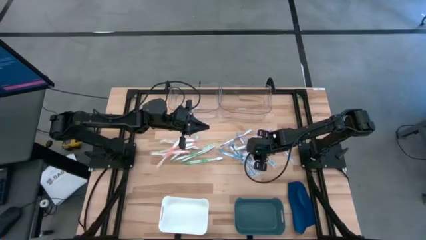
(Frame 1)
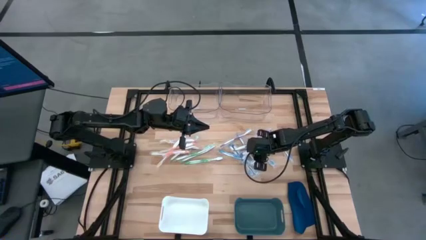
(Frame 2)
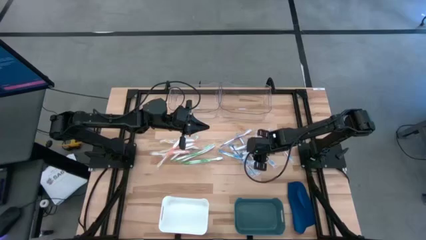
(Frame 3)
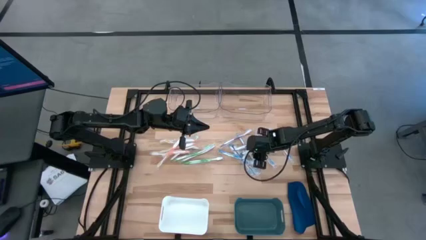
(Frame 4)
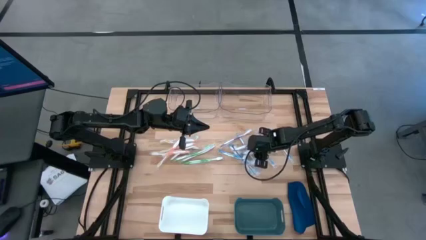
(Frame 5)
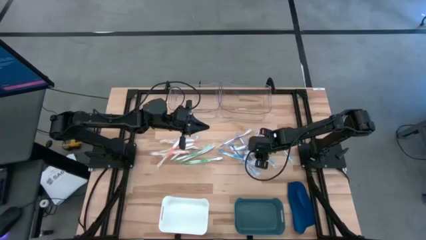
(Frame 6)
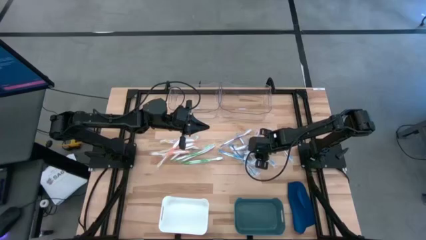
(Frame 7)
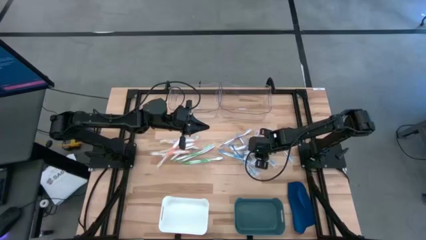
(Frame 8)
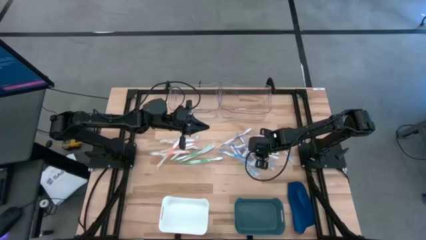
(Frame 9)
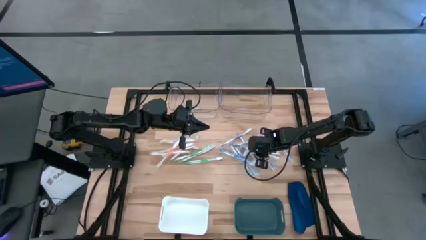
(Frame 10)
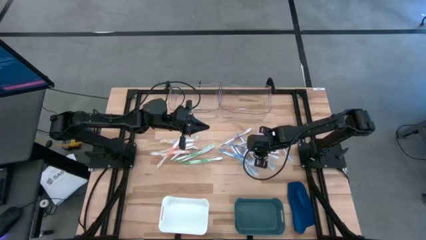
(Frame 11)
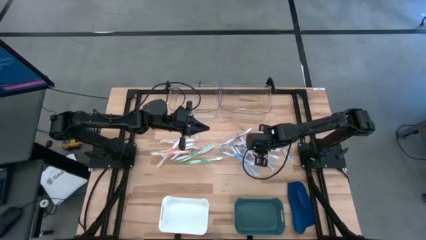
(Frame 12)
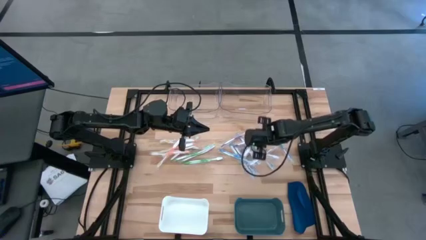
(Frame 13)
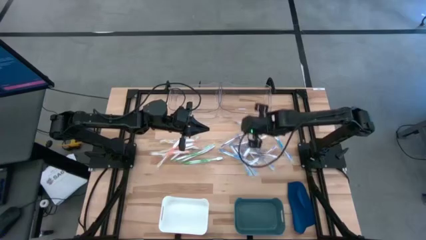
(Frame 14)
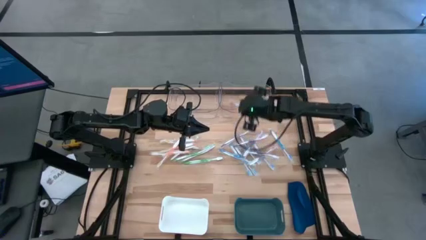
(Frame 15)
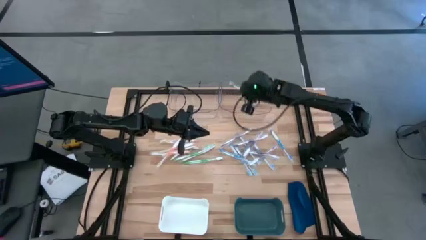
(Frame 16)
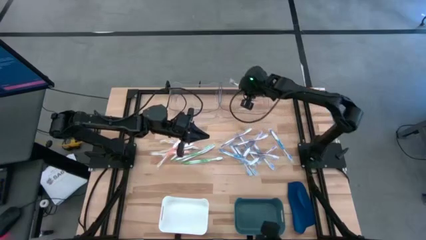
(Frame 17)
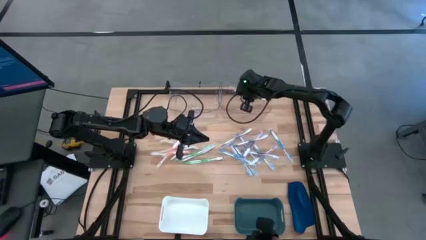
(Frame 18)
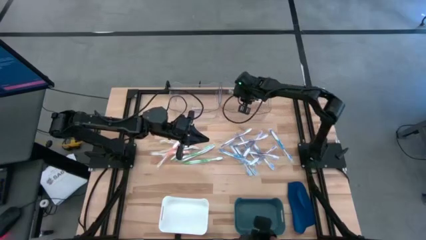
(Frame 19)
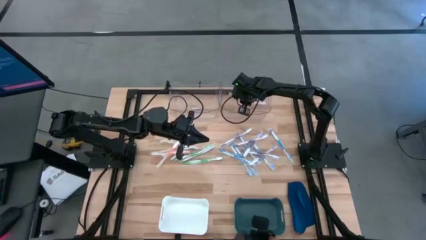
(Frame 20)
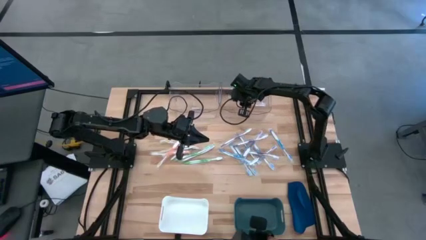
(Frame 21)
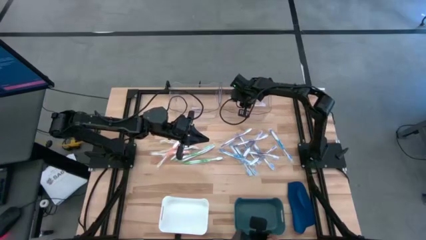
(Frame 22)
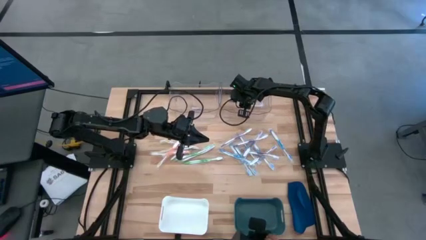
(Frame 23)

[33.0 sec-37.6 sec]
Task: Pick & Place Toothbrushes
Put the purple toothbrush into the right transparent bin

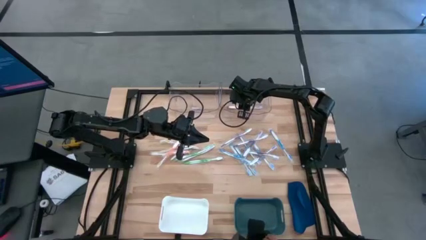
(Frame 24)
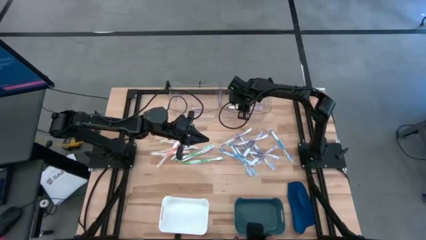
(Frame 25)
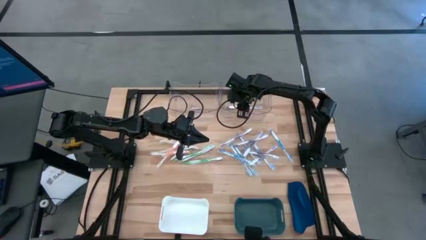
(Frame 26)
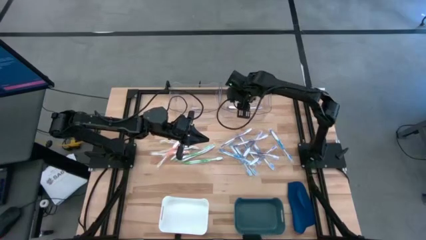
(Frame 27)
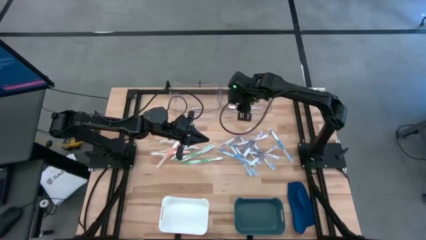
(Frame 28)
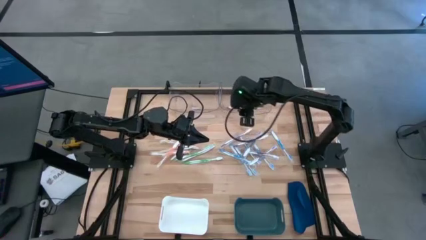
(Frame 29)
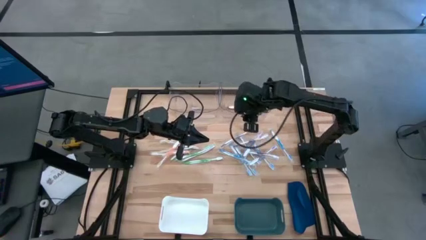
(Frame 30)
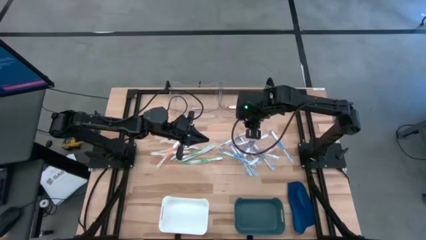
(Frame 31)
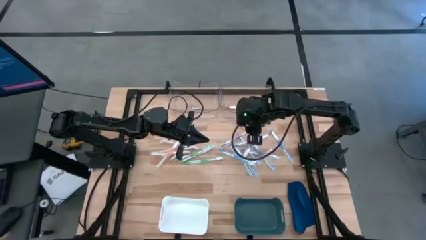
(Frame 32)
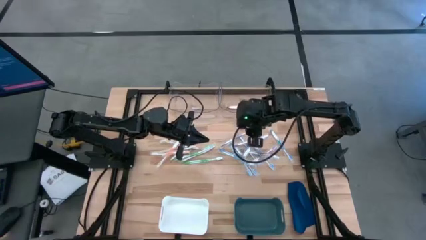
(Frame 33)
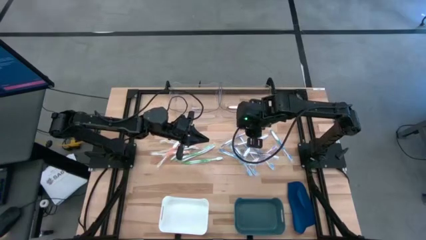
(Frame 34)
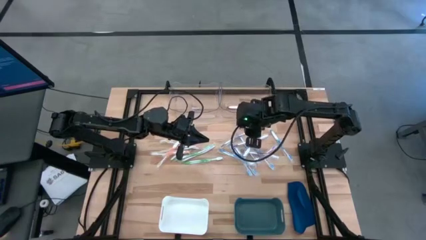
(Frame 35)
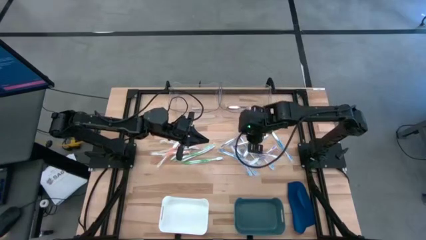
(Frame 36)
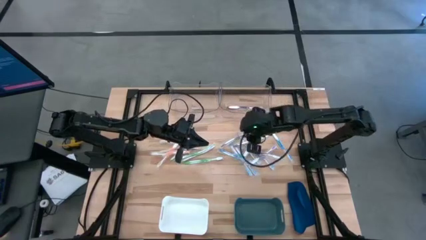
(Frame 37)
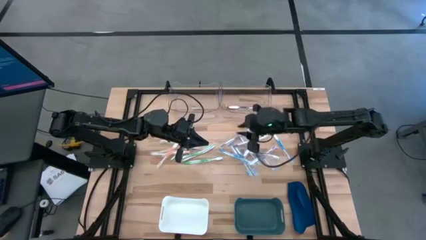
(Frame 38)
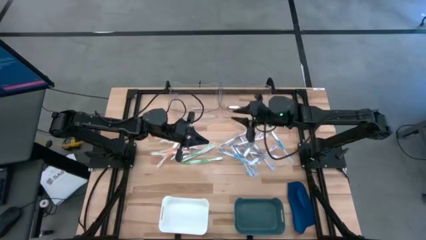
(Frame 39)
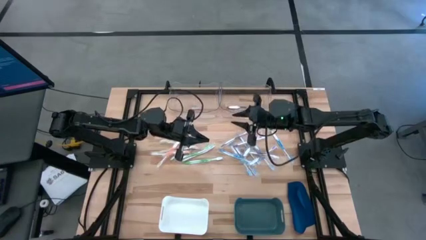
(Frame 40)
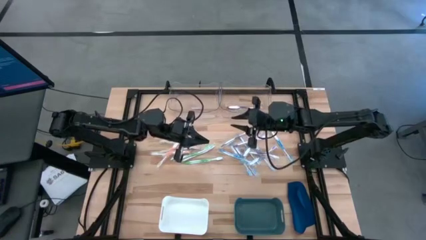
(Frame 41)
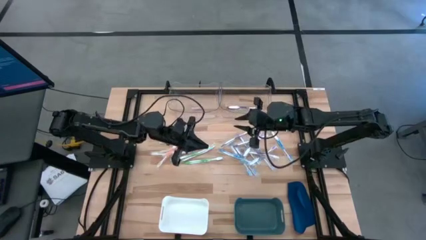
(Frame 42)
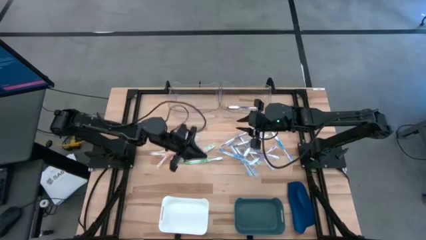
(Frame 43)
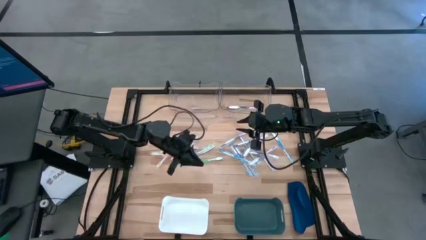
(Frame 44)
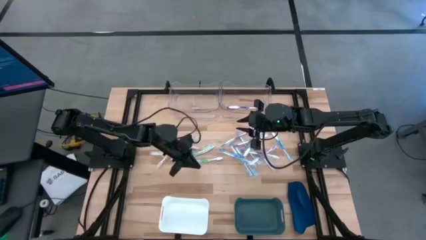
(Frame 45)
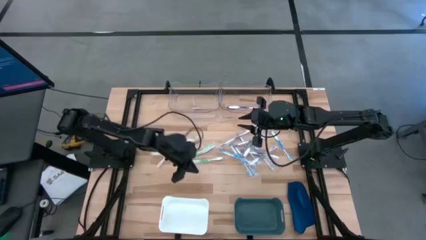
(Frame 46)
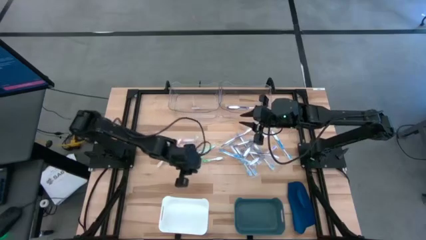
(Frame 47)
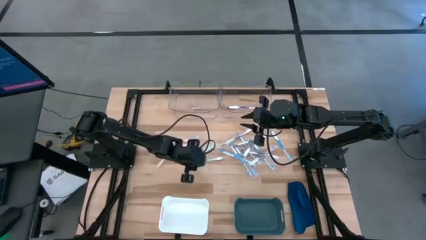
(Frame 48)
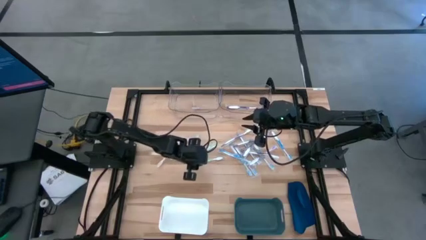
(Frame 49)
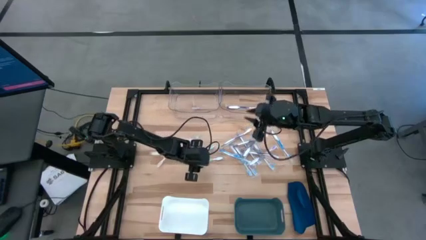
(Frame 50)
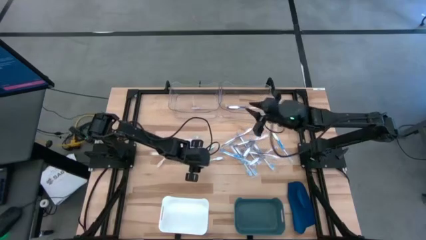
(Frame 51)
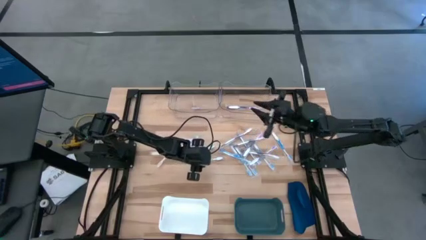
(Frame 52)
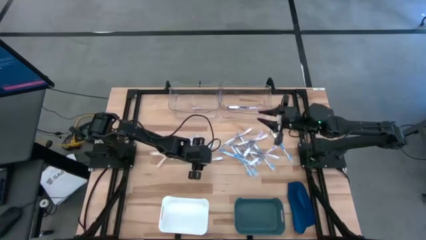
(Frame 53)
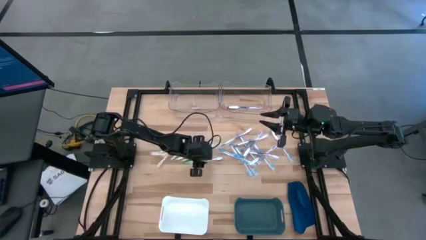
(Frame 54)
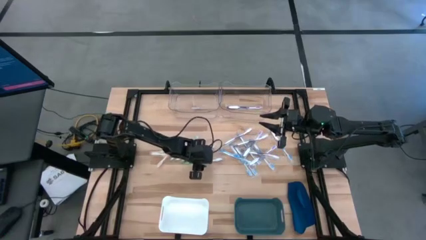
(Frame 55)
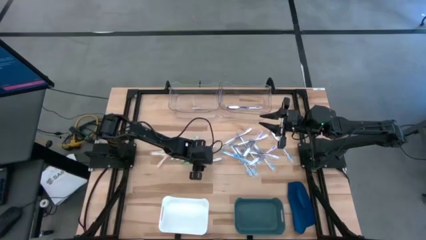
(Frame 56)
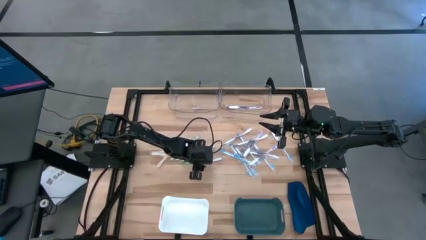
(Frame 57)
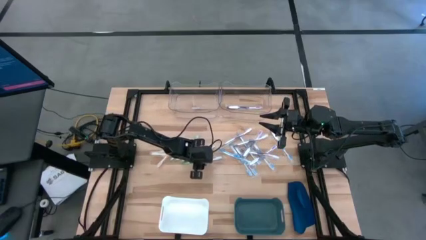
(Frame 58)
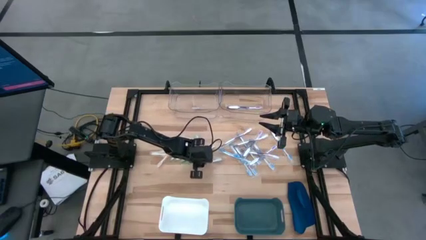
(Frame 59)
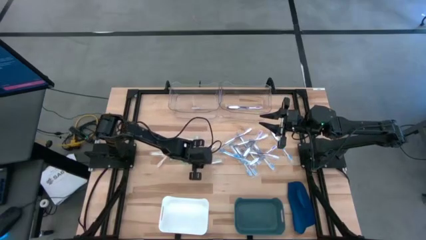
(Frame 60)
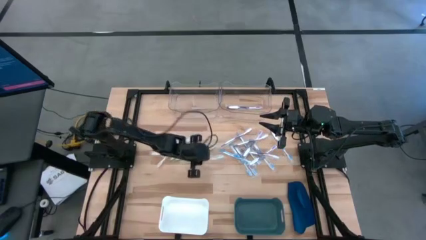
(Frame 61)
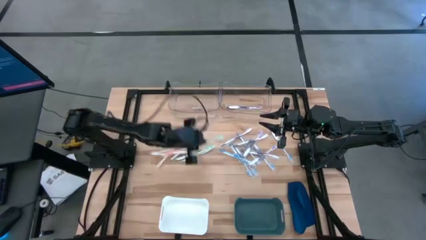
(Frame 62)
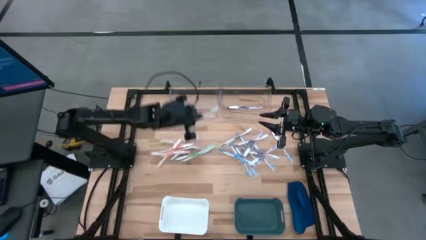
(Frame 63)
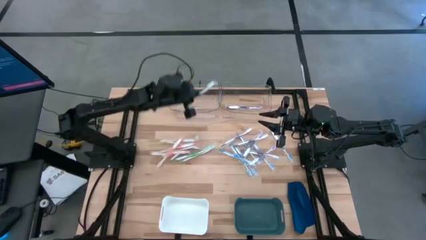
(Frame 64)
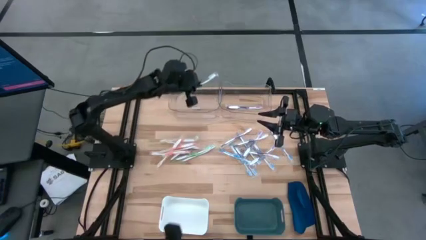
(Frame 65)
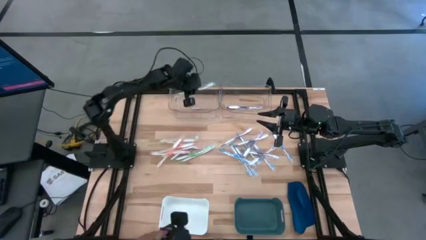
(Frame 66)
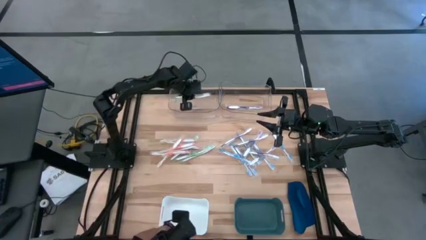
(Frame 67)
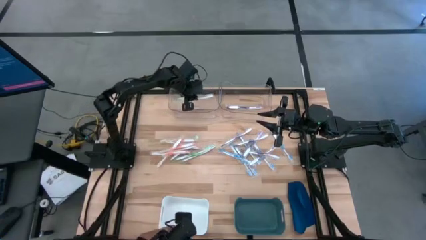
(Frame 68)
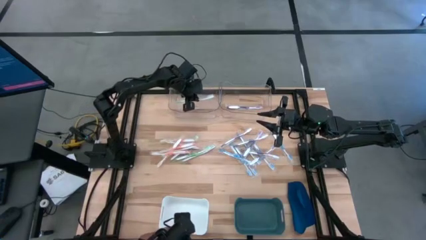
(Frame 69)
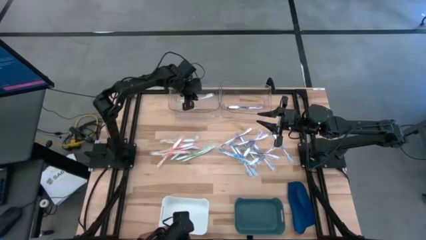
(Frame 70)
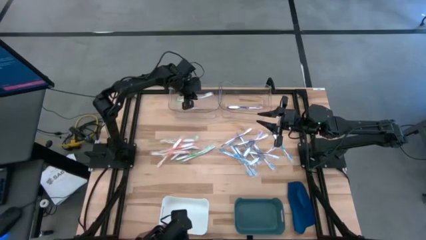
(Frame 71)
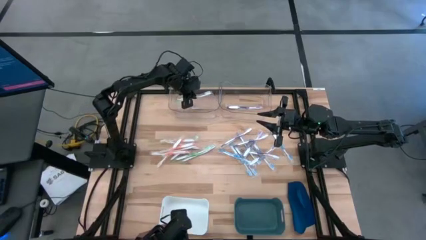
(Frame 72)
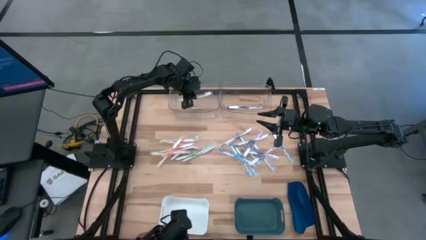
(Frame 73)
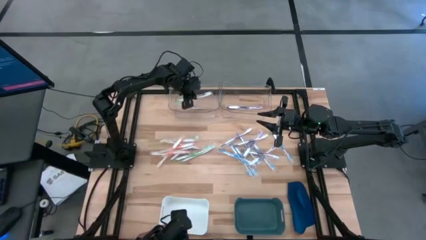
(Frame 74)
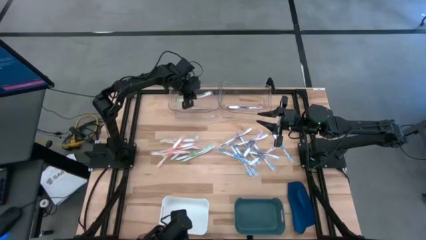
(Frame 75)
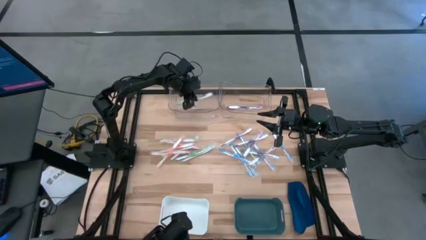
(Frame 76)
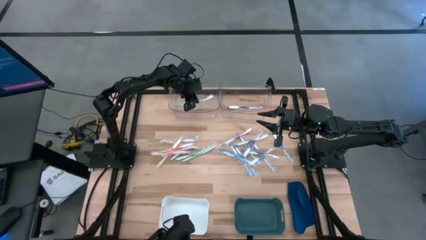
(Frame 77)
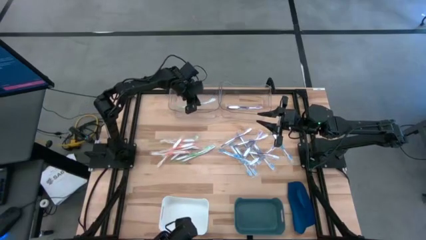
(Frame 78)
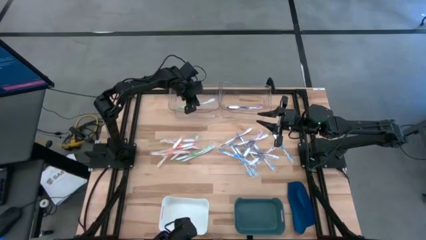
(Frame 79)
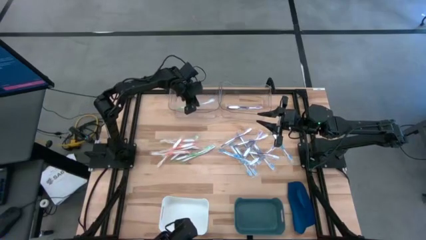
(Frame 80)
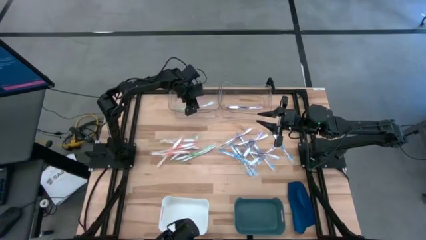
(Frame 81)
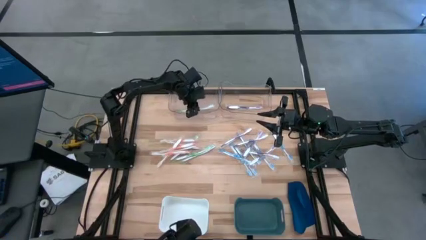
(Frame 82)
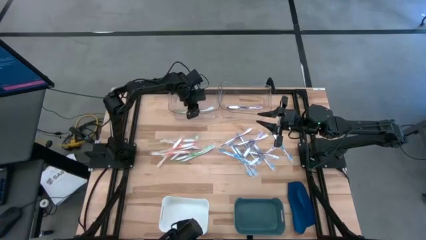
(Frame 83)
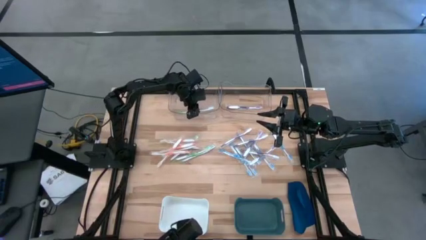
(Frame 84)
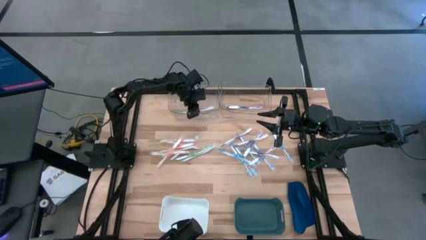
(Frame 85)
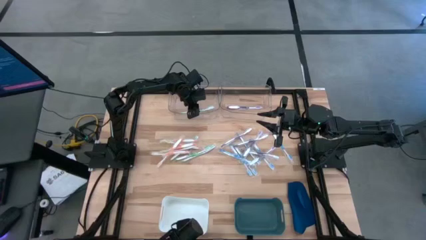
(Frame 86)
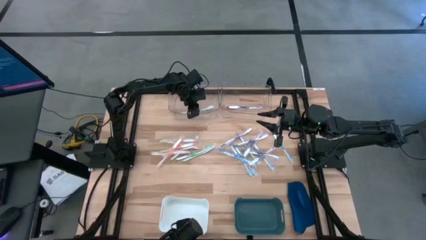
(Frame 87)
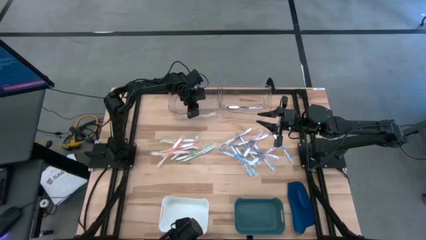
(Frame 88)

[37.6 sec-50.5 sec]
Put the green toothbrush into the left transparent bin
